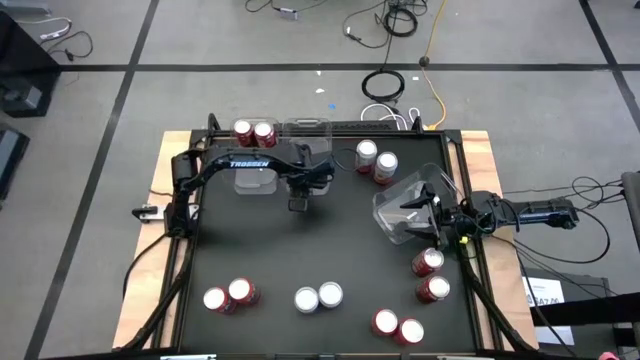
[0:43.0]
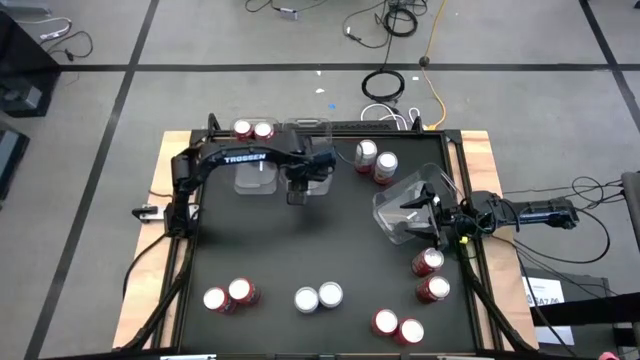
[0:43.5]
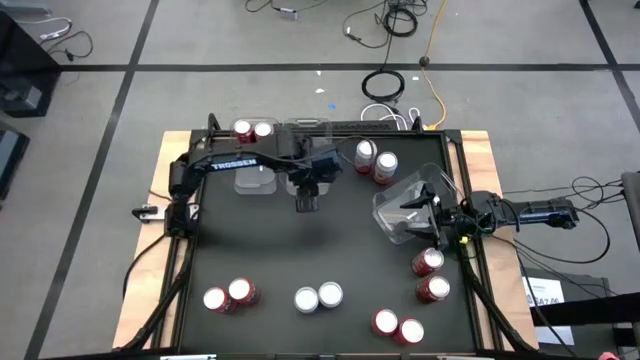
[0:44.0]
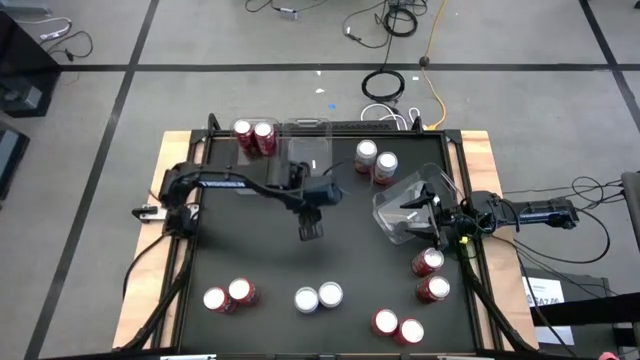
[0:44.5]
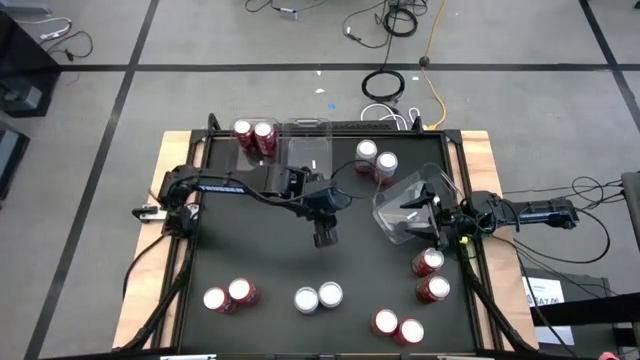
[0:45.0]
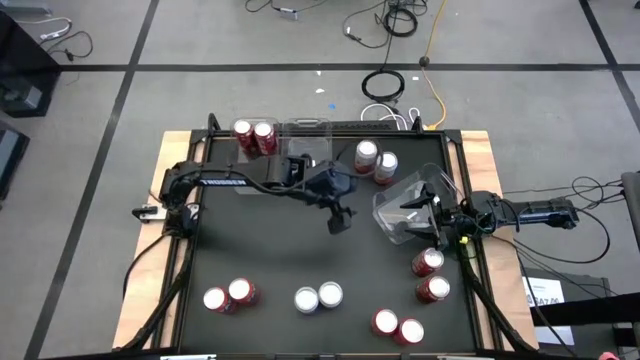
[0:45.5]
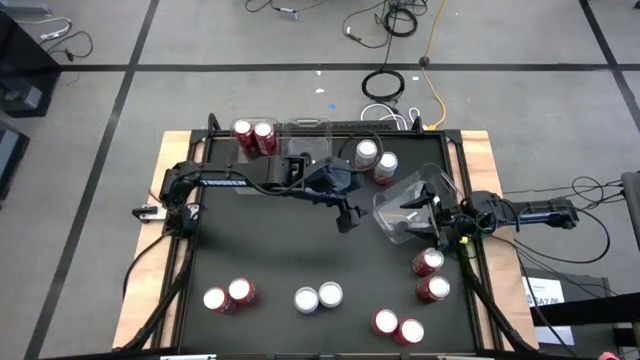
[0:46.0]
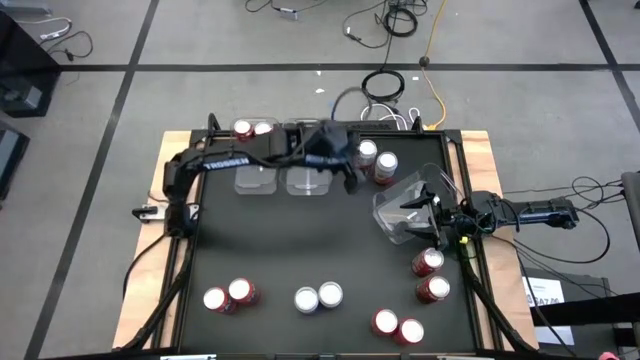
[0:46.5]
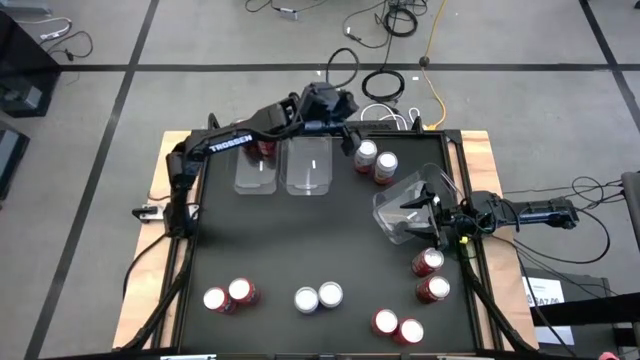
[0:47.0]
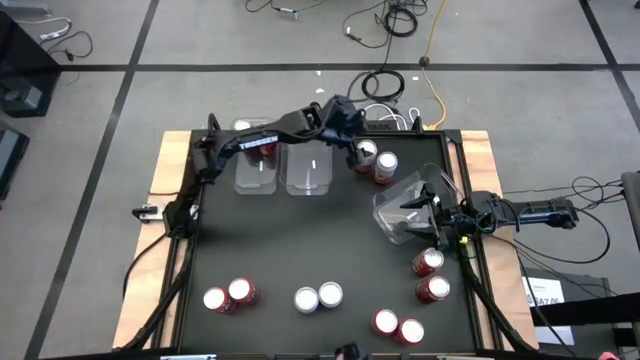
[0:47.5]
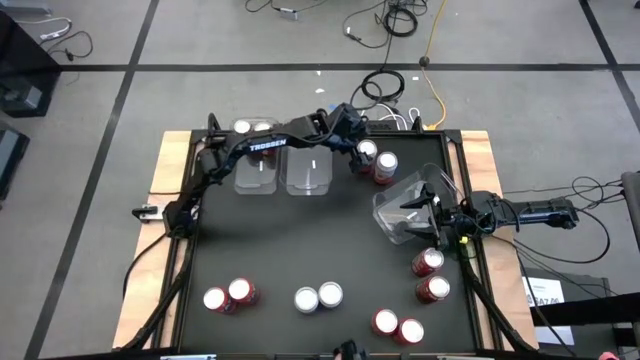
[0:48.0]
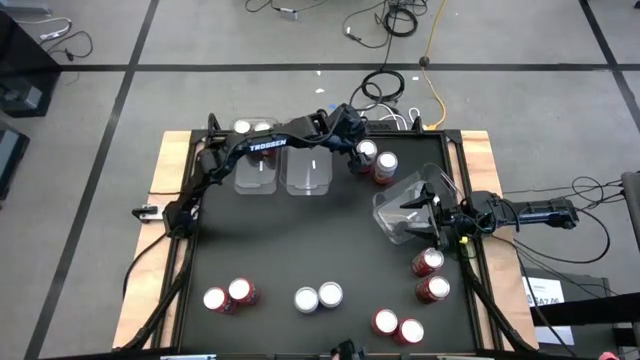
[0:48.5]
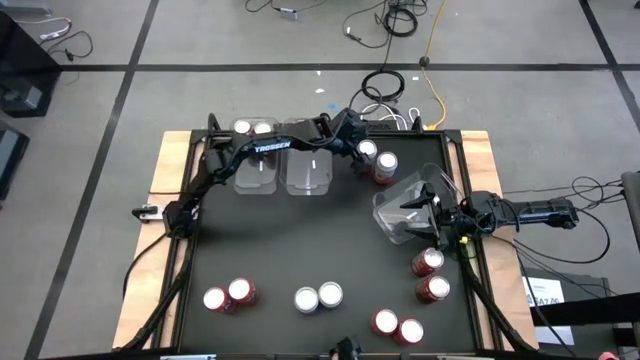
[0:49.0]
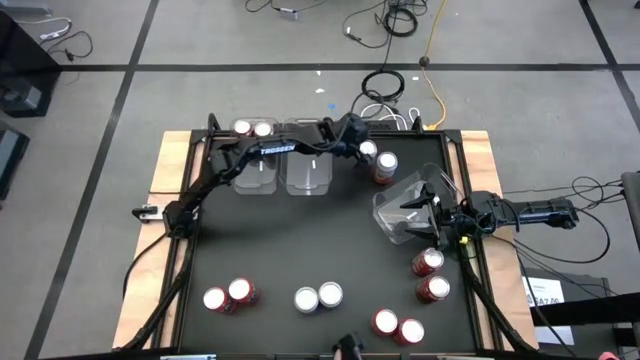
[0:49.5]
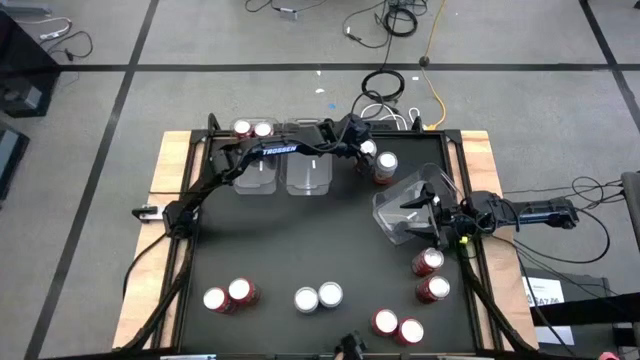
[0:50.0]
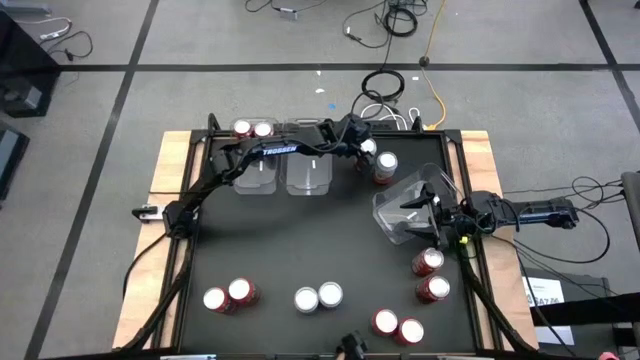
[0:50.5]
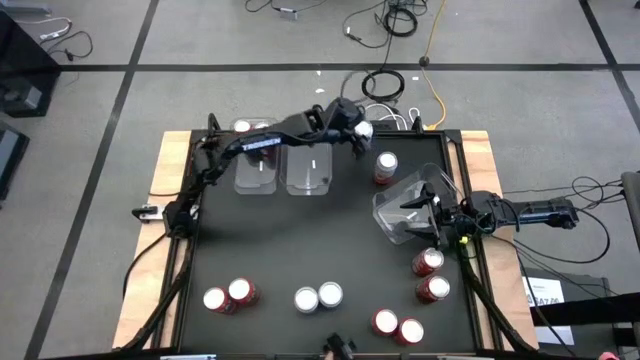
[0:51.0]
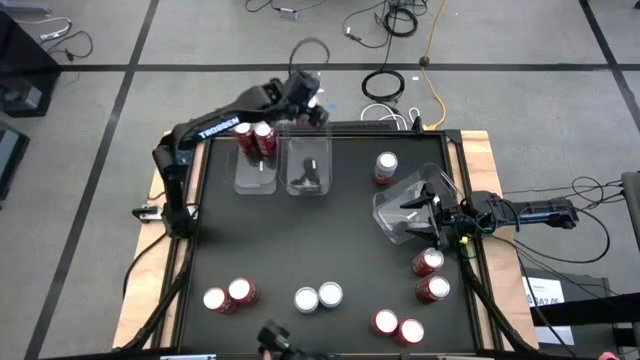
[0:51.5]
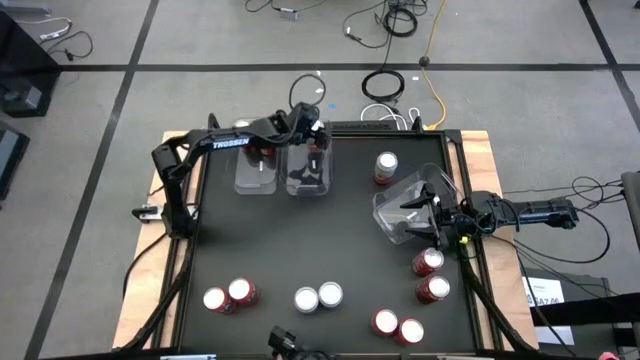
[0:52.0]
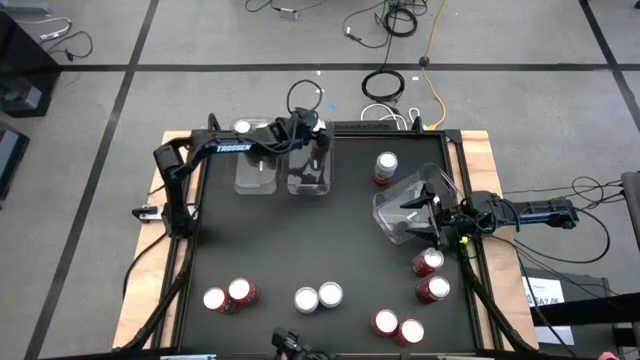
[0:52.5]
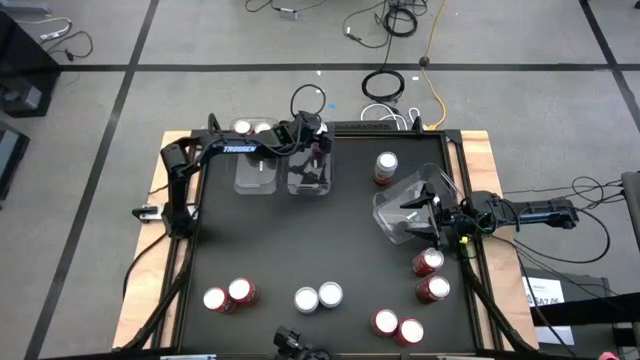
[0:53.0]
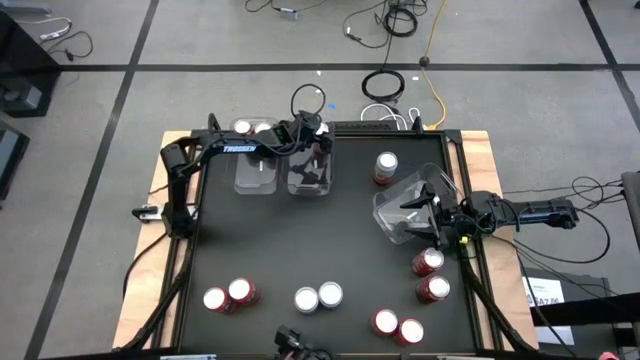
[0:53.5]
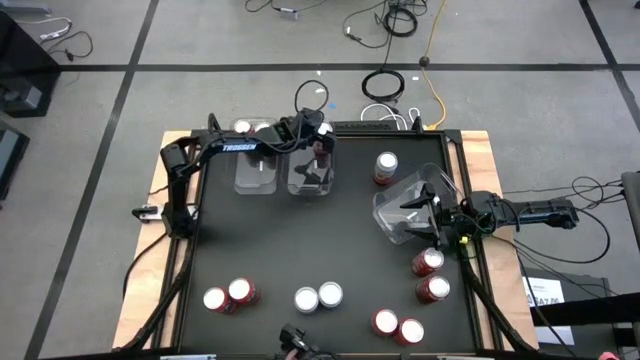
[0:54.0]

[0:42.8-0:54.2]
Task: Sort soda cans
Put the top left pink soda can into the middle transparent bin

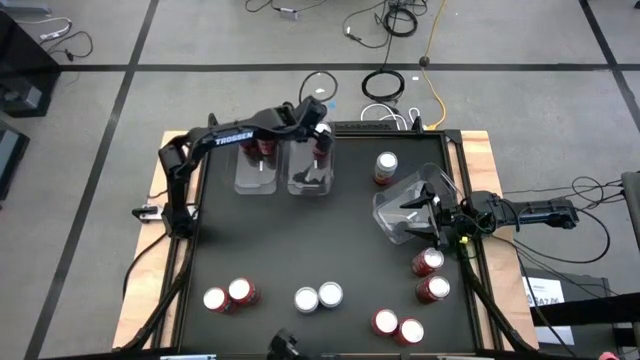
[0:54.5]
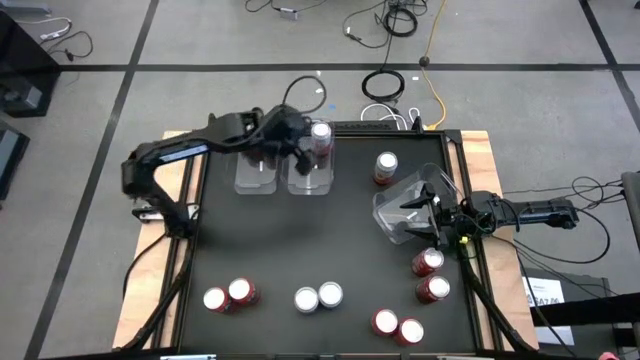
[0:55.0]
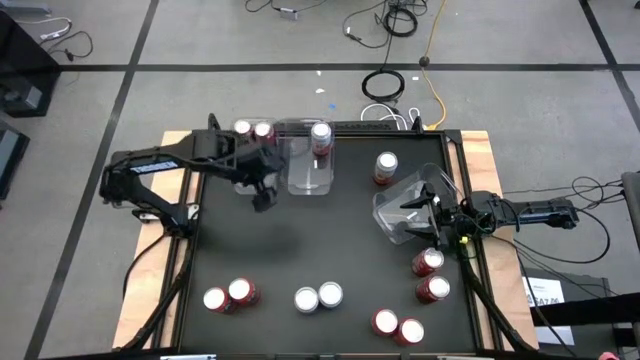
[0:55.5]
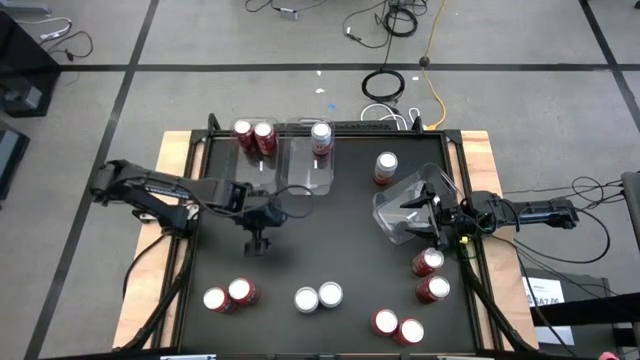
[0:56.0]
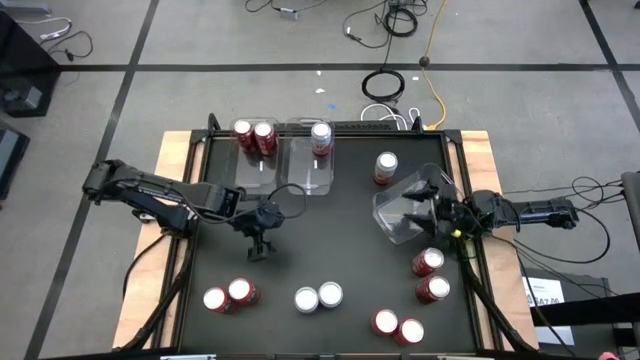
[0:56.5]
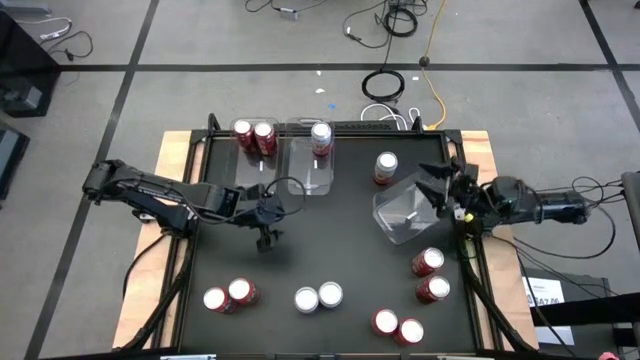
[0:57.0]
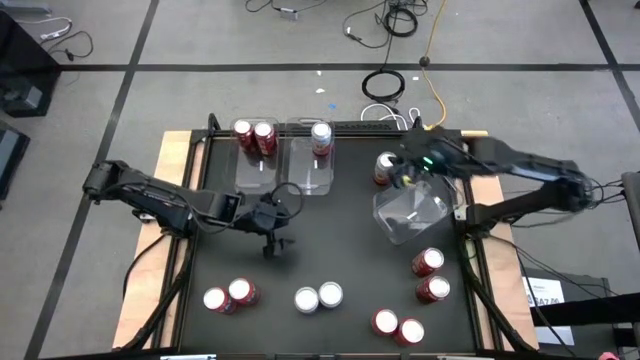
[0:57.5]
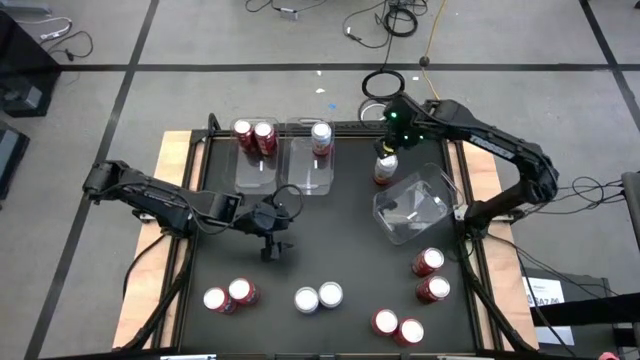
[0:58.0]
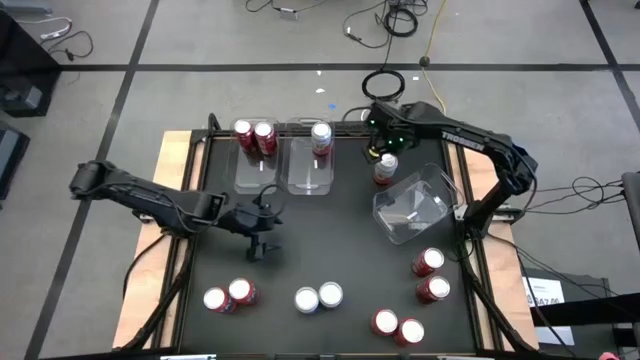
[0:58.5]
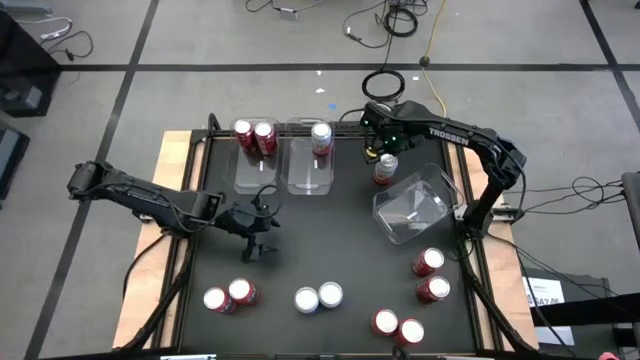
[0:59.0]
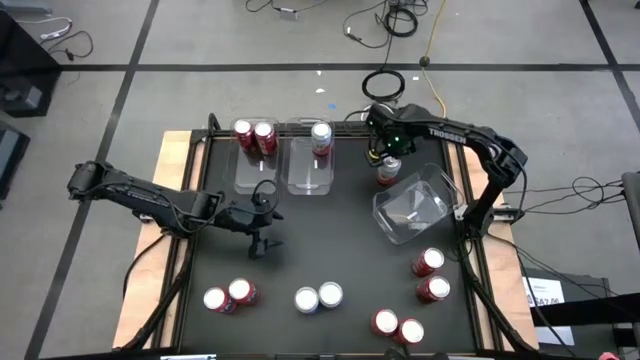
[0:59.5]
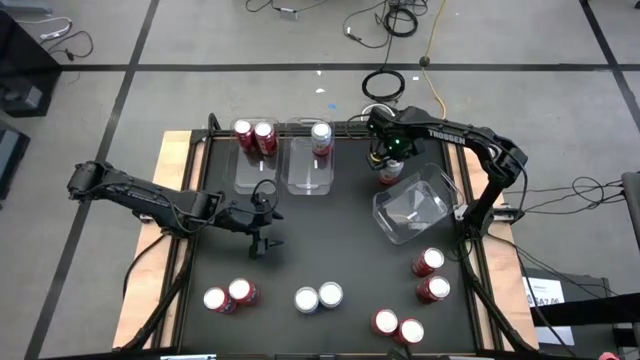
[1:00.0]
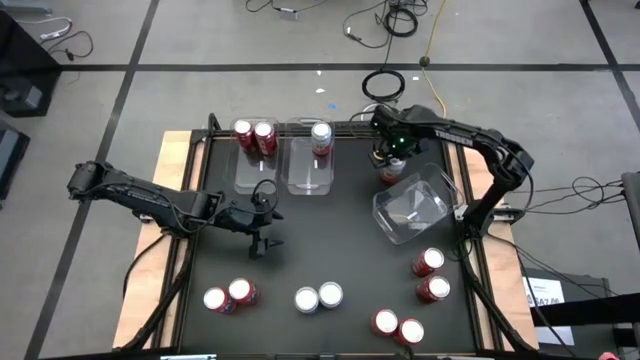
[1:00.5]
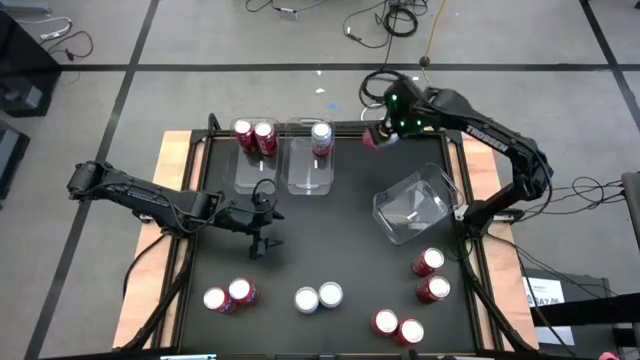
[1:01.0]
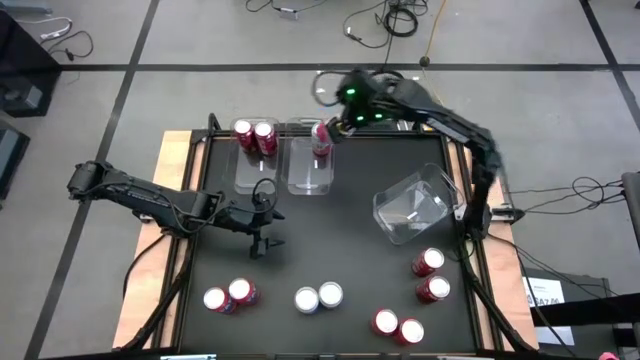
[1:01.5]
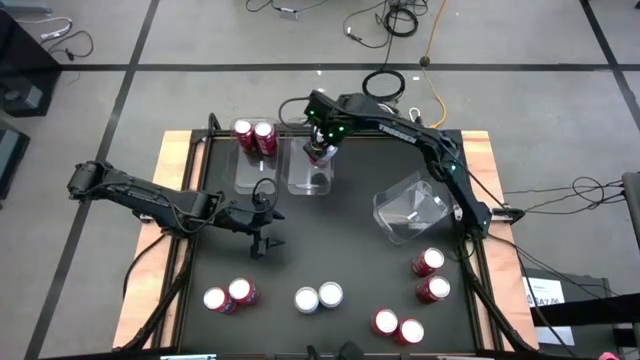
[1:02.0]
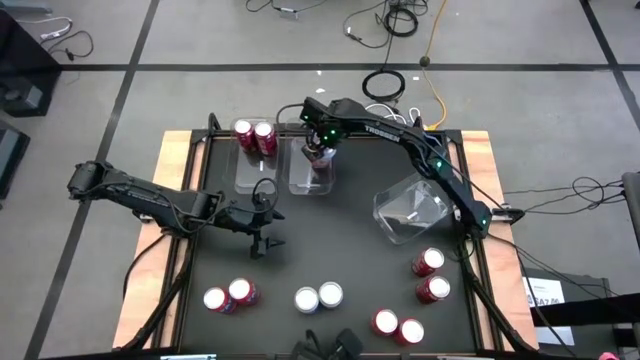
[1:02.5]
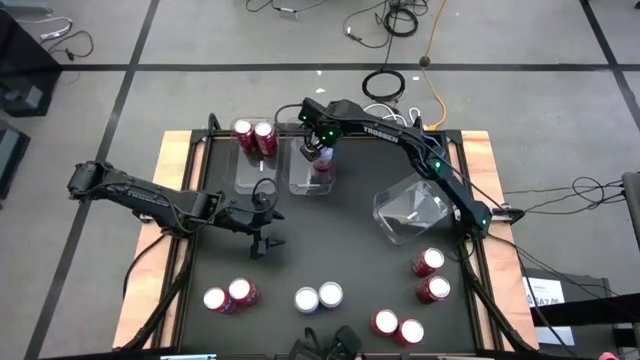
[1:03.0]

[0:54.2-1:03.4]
Put the top right pink soda can into the middle transparent bin
